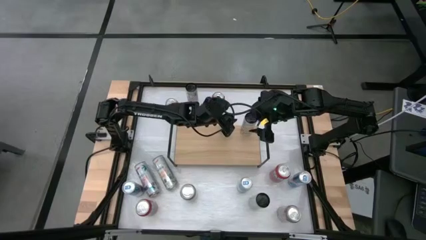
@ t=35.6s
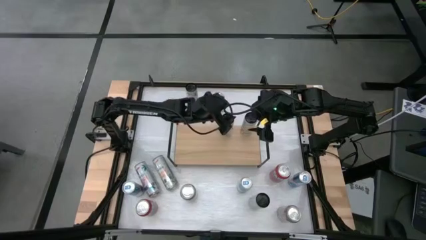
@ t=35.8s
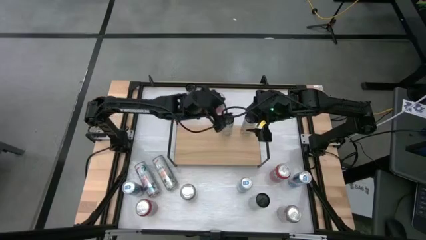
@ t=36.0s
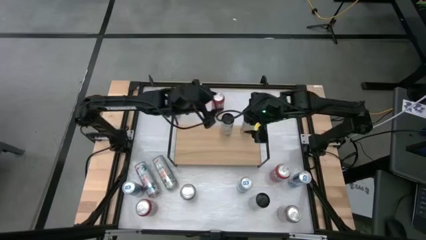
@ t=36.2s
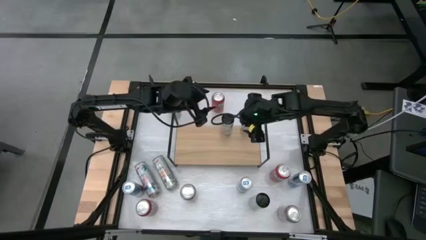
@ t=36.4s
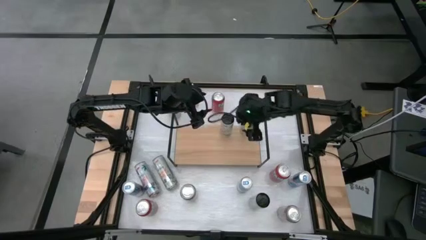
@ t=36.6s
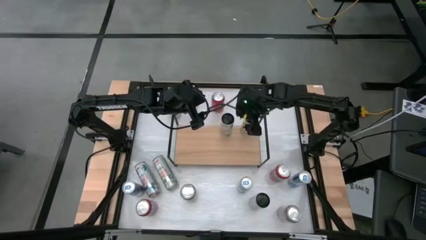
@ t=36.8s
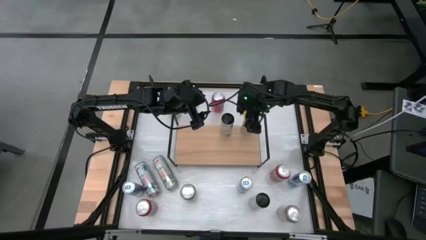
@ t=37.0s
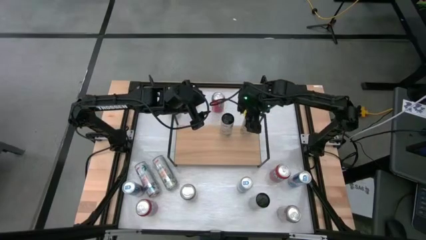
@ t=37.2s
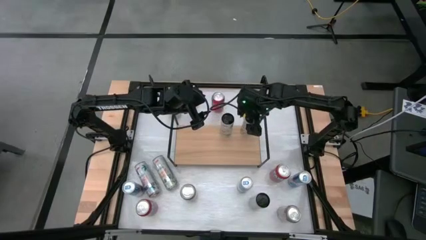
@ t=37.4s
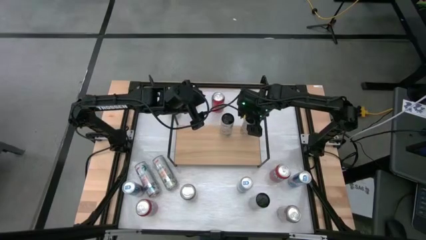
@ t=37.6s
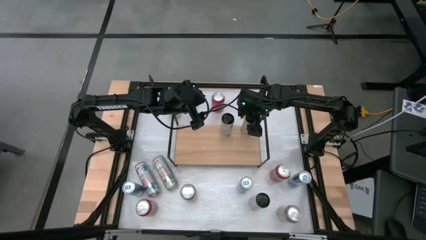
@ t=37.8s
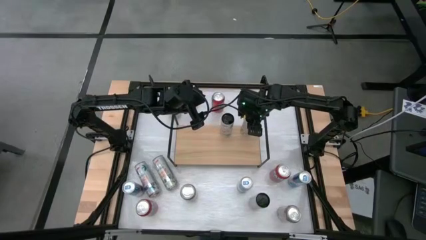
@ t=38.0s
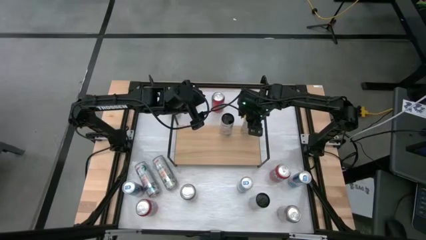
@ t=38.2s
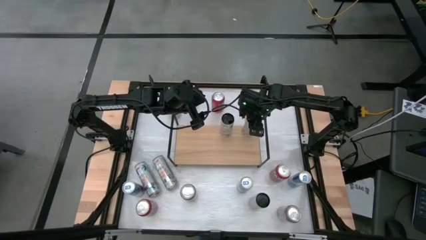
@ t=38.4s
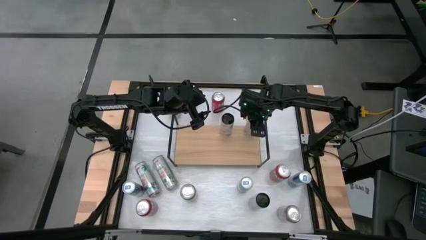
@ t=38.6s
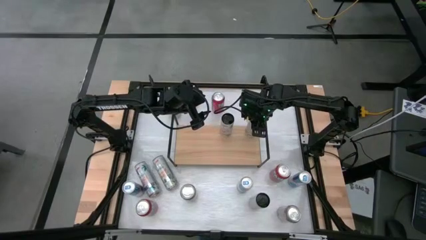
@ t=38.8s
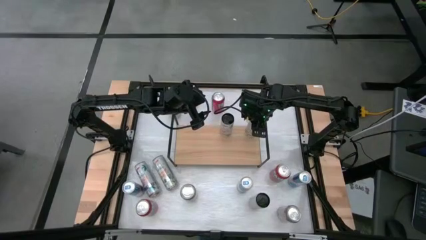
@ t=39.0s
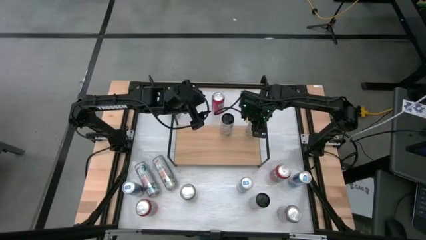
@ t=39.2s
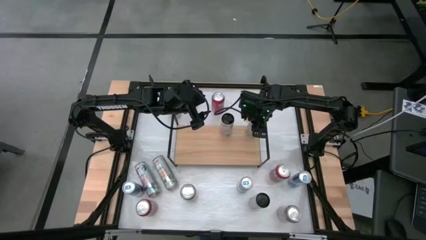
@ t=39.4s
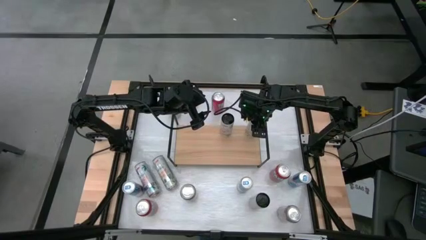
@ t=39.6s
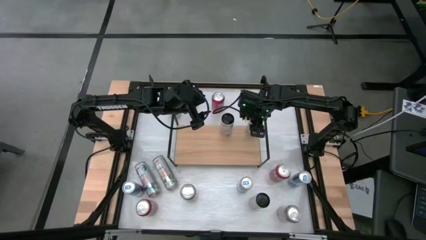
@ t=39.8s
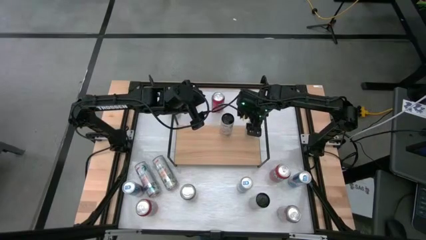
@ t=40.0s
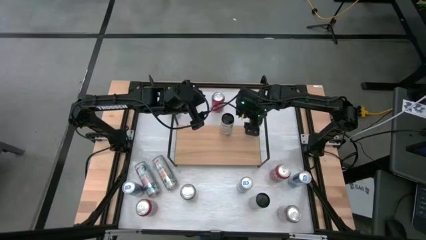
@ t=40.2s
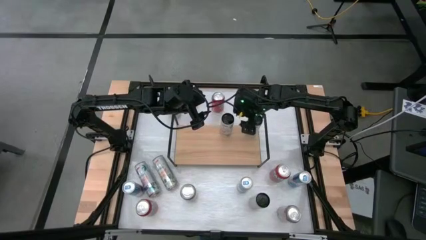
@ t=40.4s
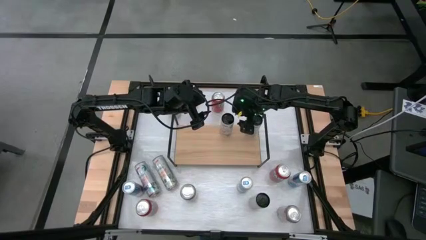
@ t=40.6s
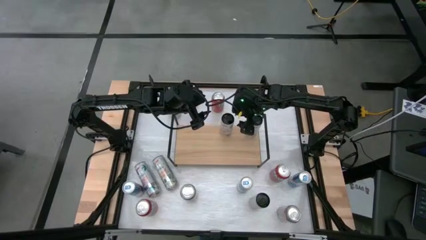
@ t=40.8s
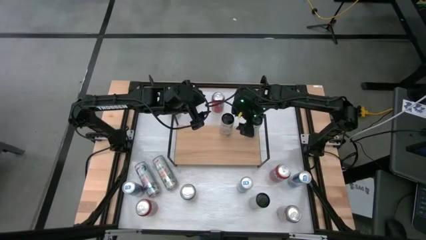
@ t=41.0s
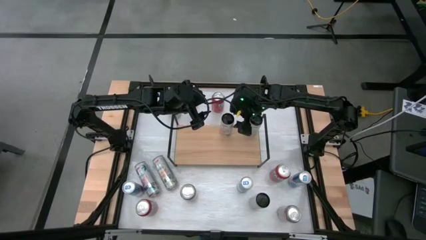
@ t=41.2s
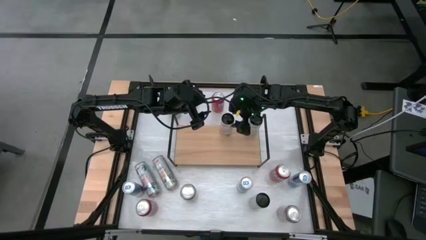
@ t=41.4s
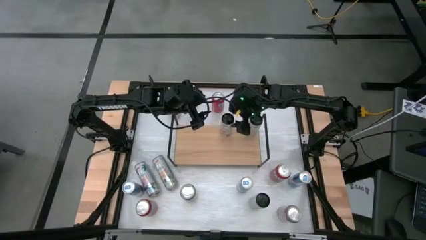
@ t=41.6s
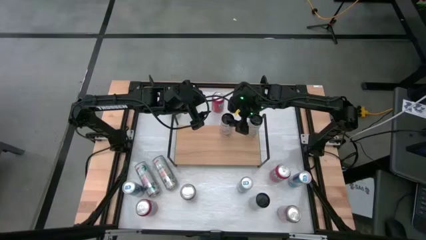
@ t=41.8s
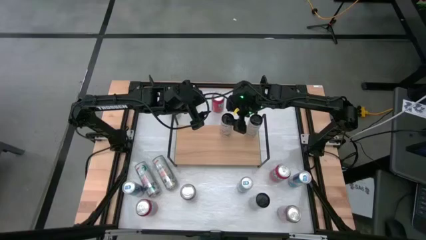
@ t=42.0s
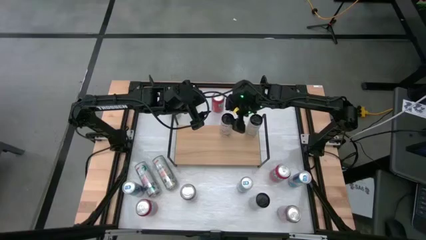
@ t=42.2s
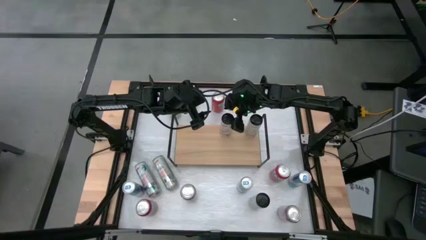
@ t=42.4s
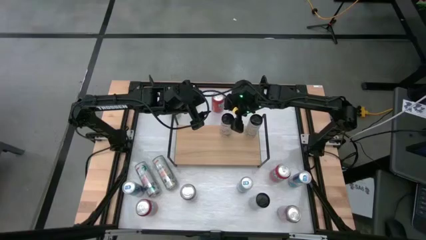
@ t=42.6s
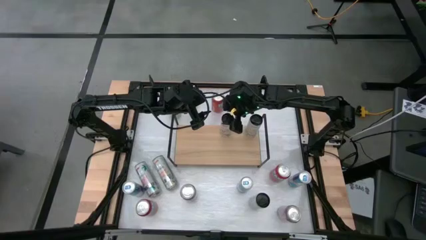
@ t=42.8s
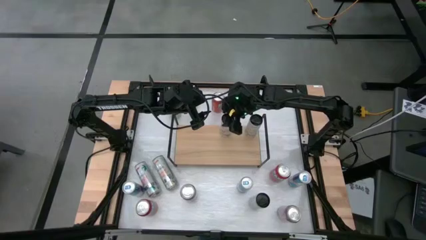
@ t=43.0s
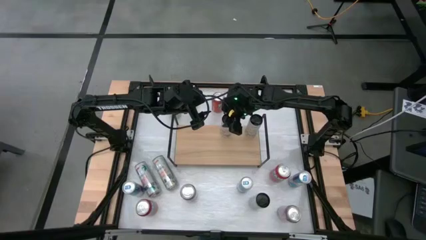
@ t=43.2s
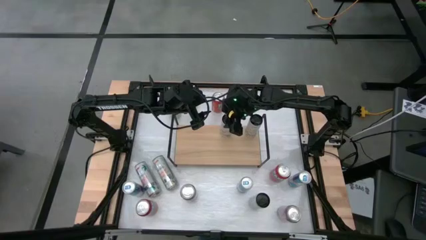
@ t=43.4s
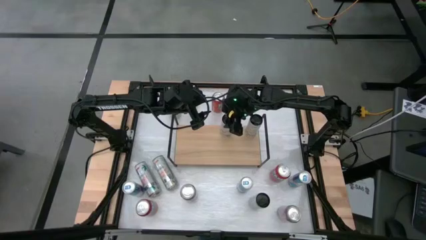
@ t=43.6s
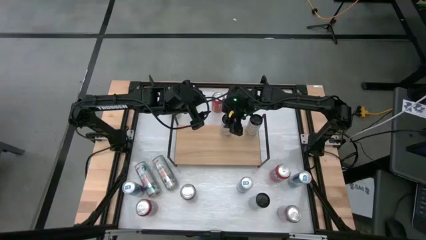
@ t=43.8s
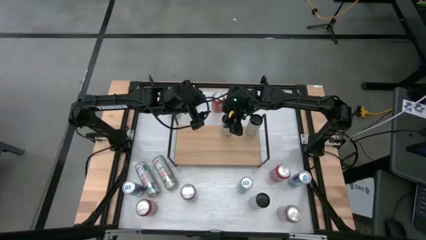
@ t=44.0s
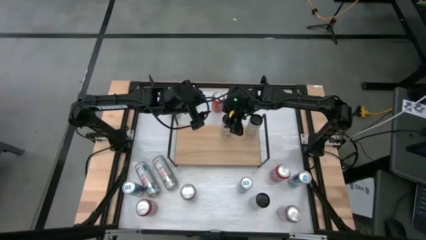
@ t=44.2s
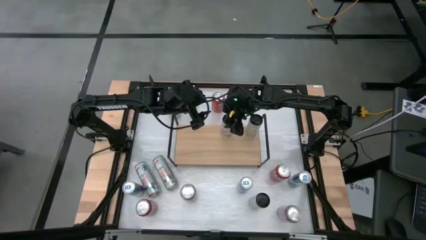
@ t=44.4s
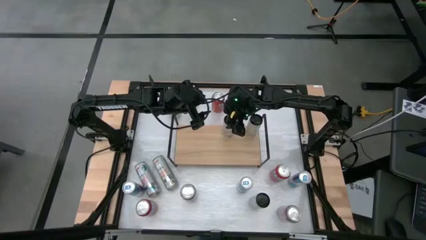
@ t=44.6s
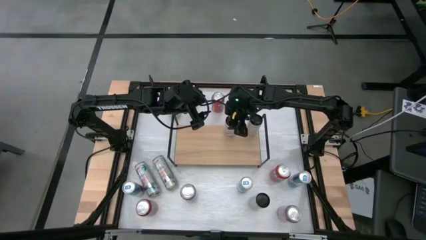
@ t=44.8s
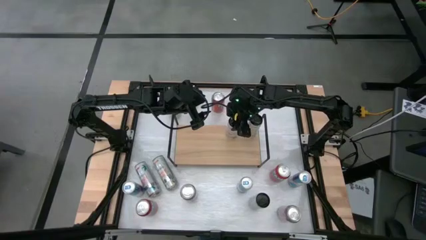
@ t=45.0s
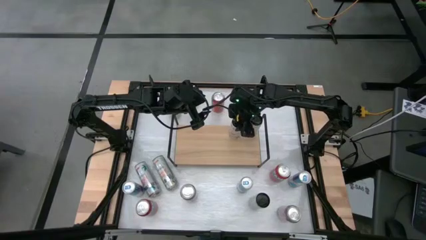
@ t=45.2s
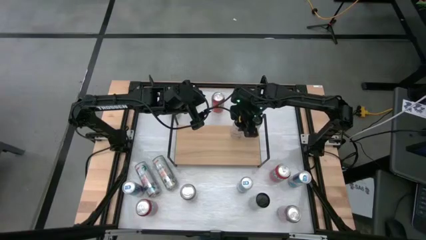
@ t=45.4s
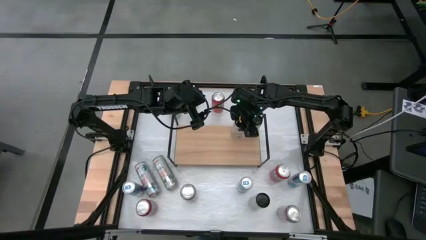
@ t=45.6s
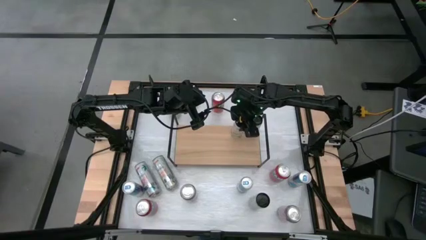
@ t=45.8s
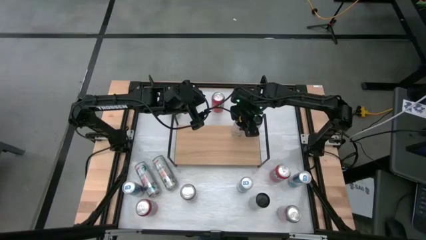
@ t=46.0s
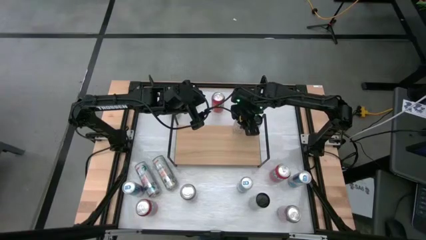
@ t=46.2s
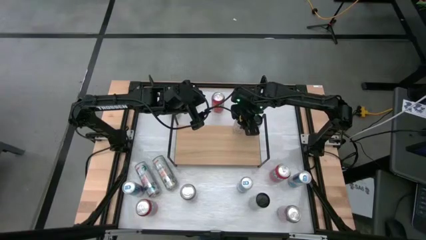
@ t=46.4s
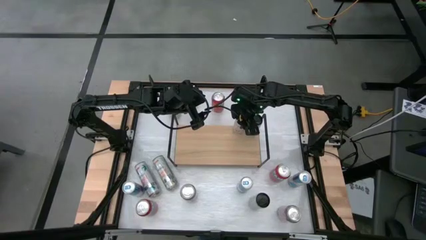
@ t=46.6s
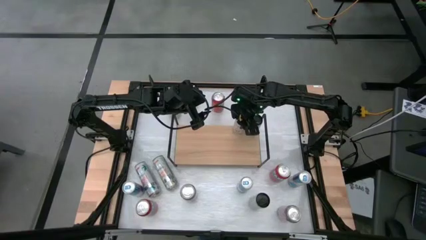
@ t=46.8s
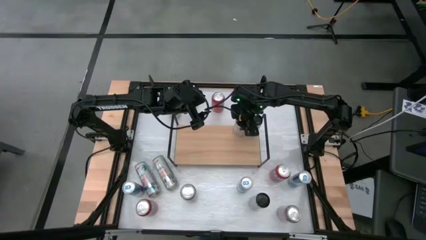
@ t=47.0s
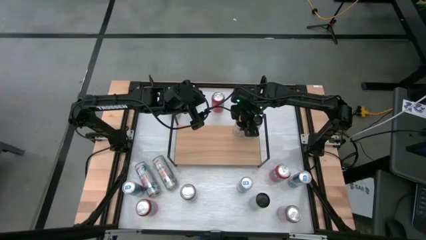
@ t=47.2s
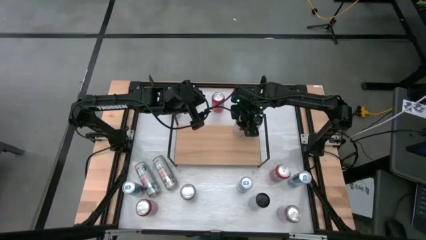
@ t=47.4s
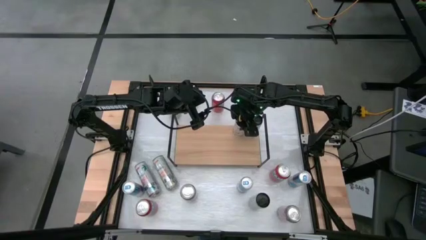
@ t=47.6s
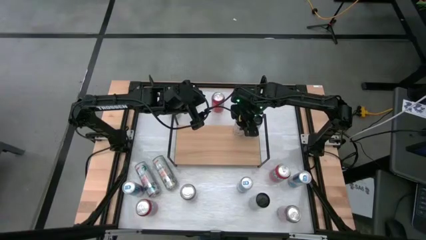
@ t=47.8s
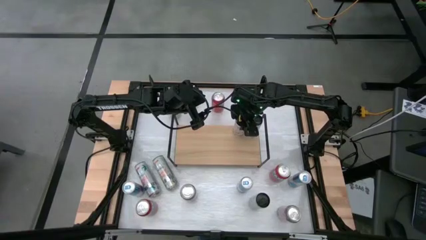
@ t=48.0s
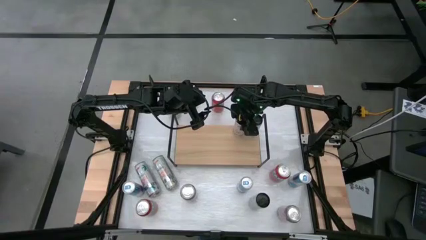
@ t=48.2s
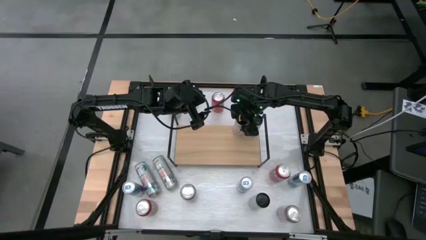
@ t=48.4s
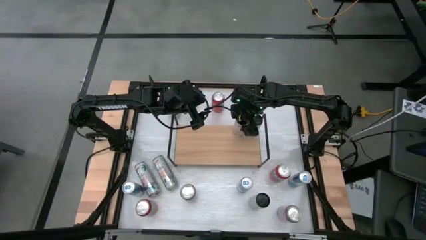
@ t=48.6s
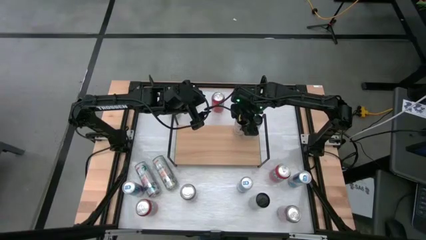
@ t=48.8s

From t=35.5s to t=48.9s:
Task: Place canned beverage on shelf
Adjust the soda cans on the shelf
